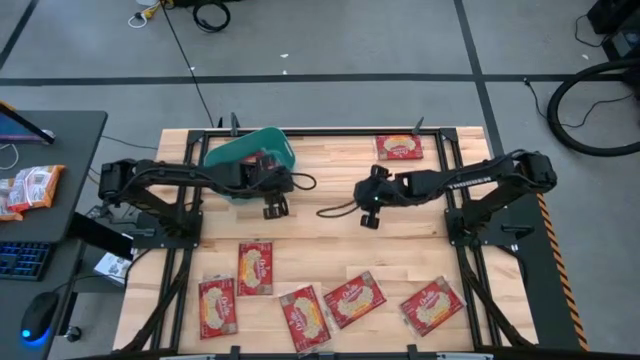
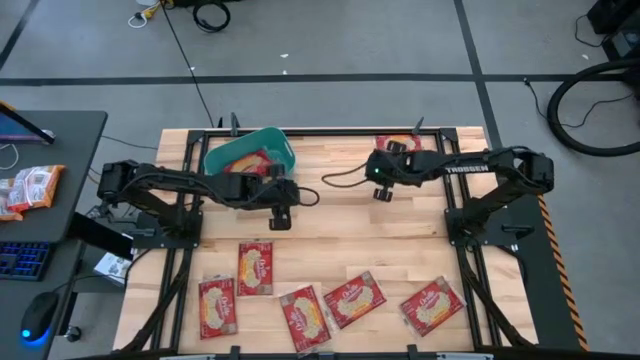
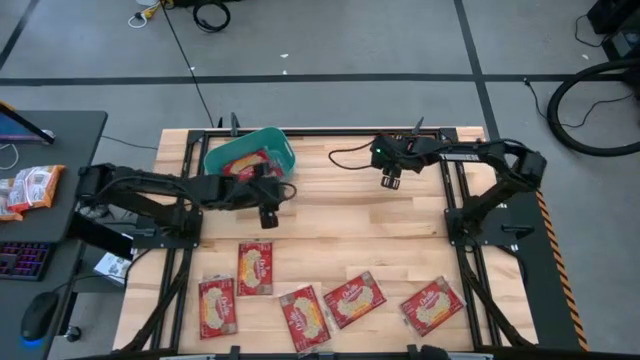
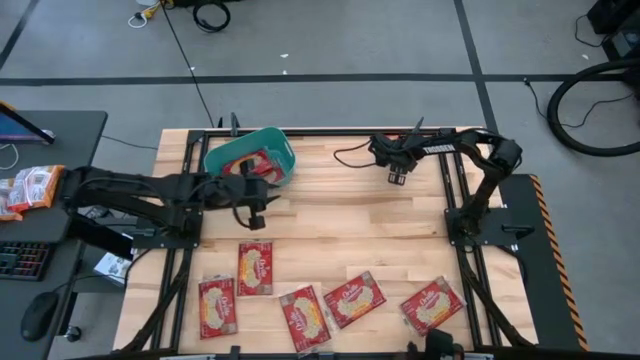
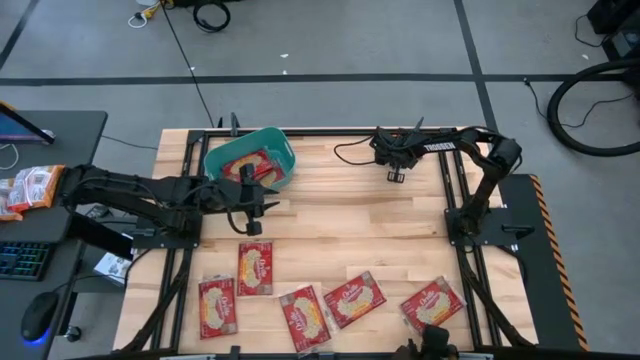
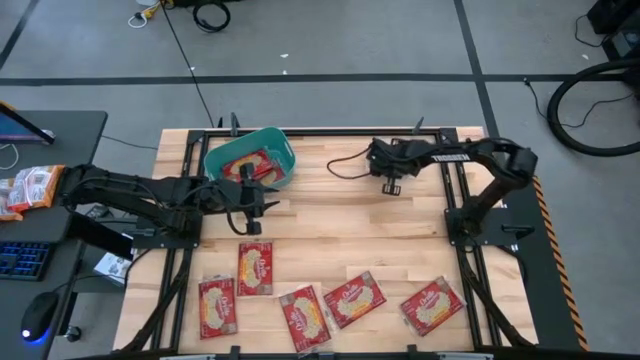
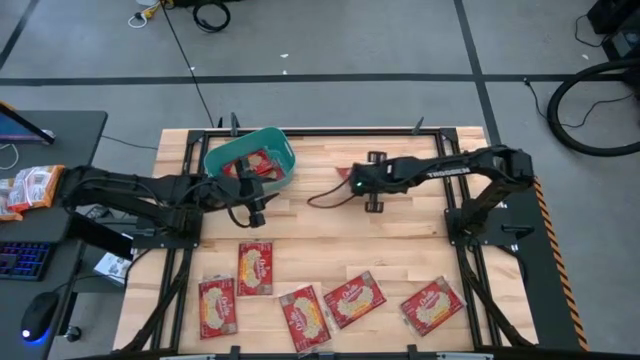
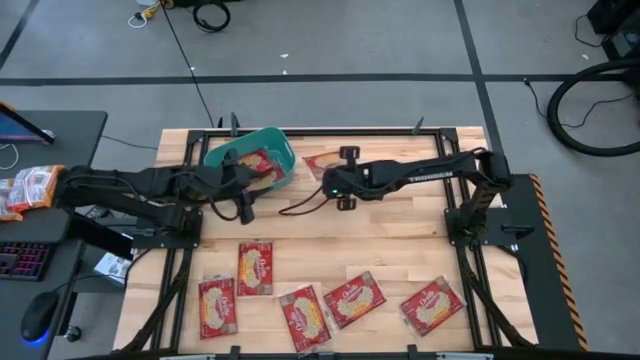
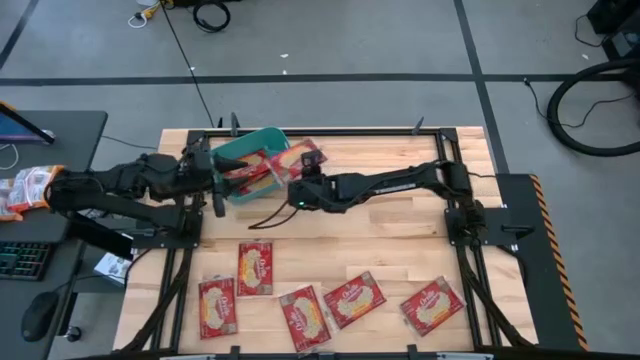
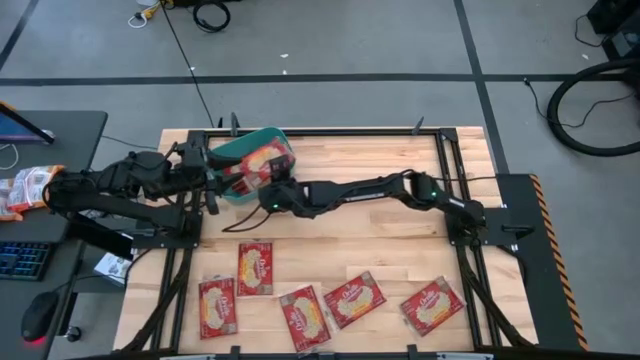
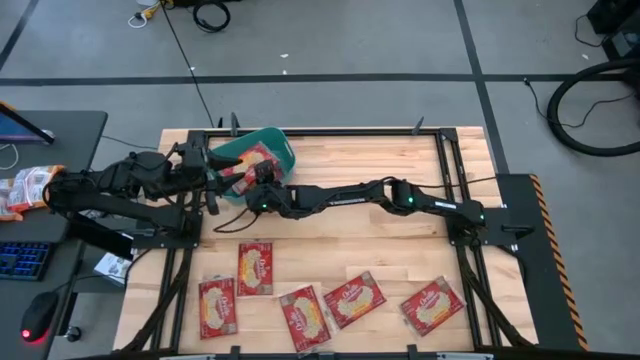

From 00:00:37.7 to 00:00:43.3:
Task: Sort popcorn bags into baskets
Put the popcorn bag into the bin

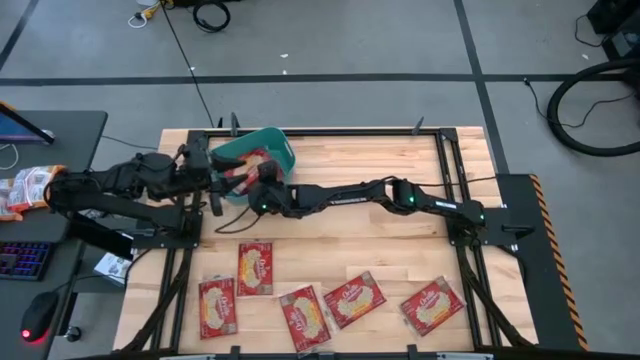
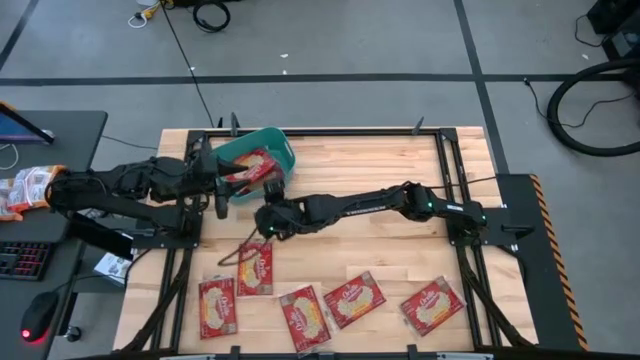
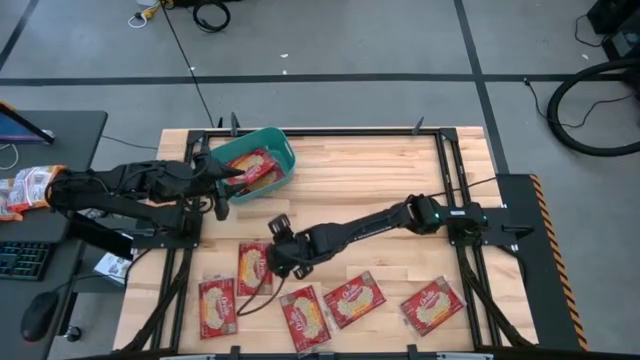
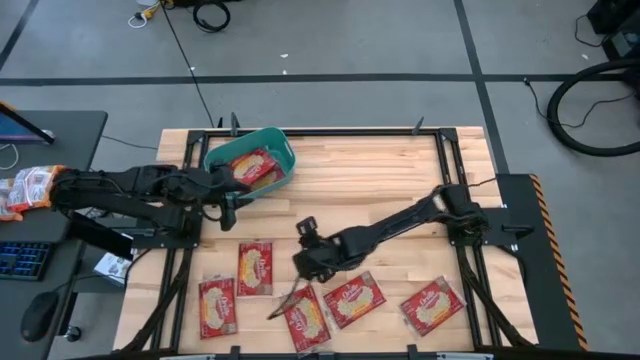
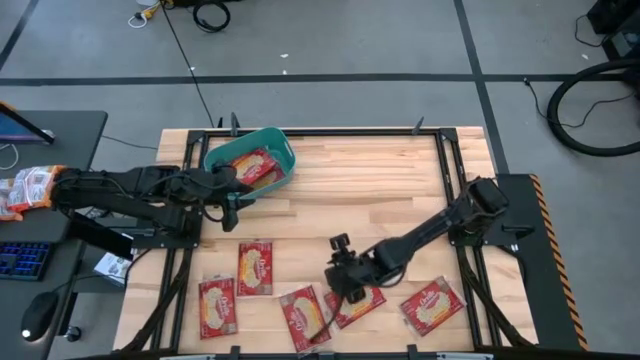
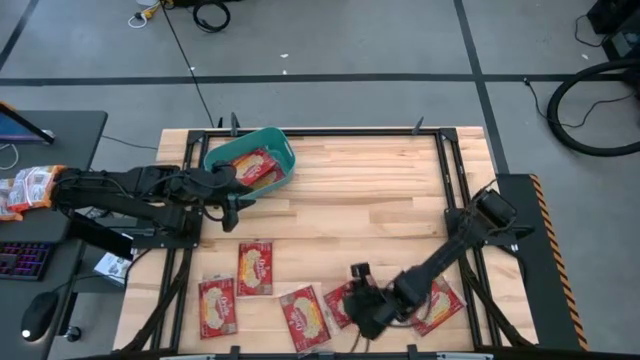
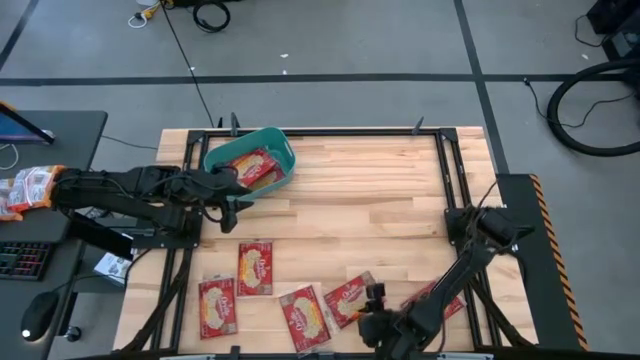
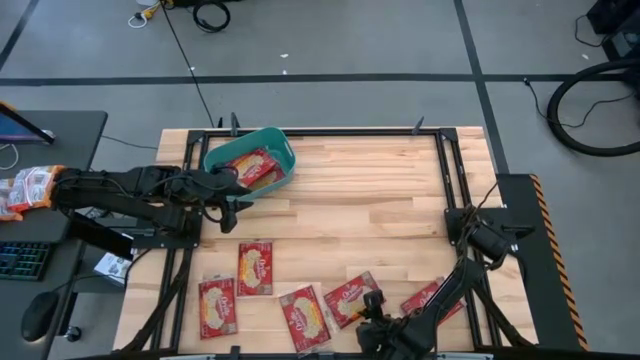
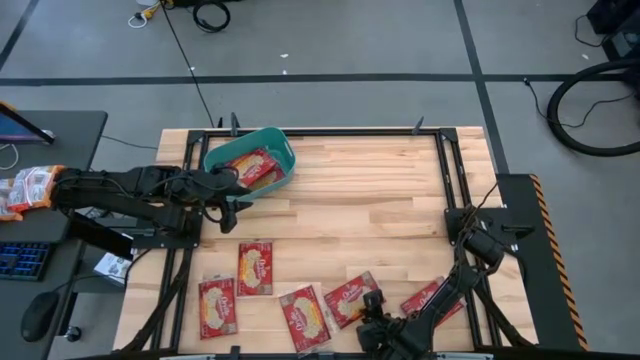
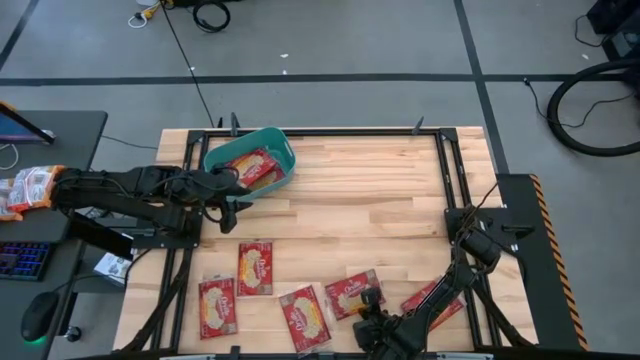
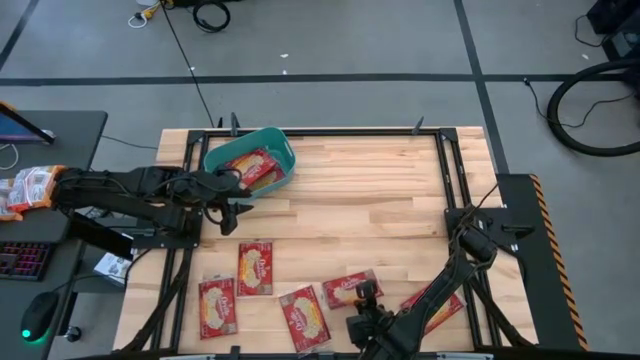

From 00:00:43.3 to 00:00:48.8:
Put the popcorn bag into the bin

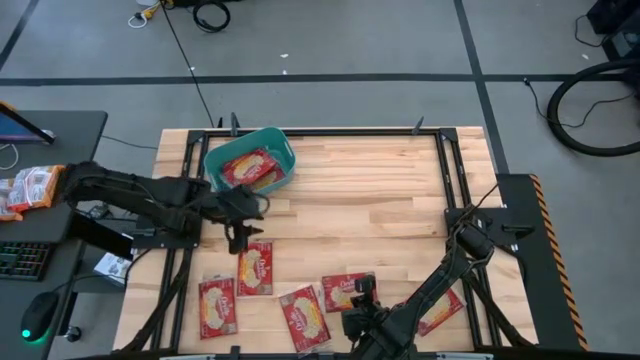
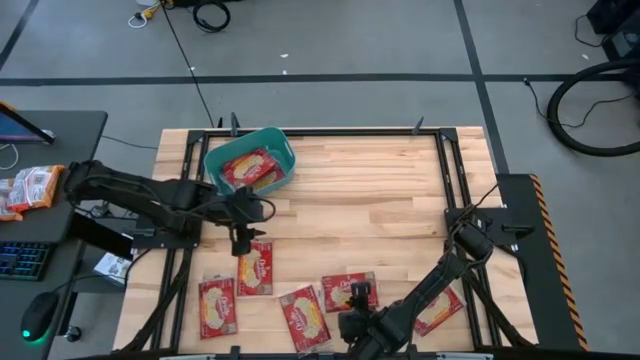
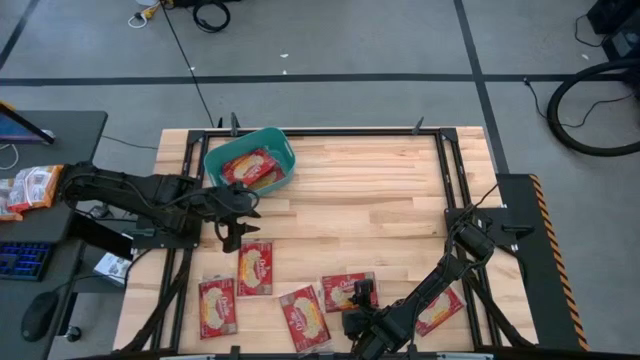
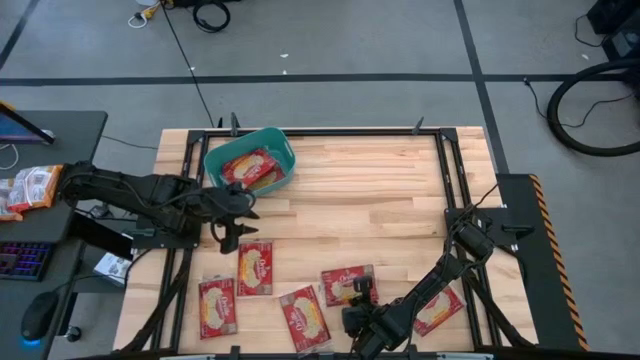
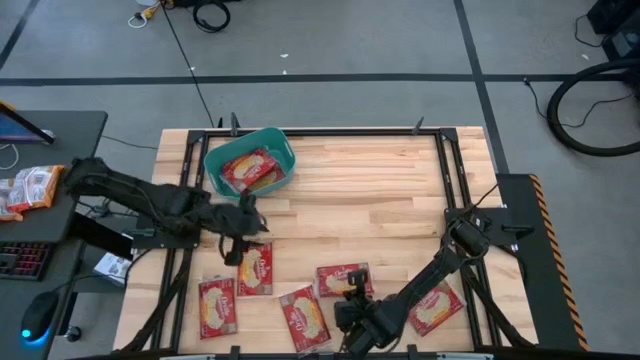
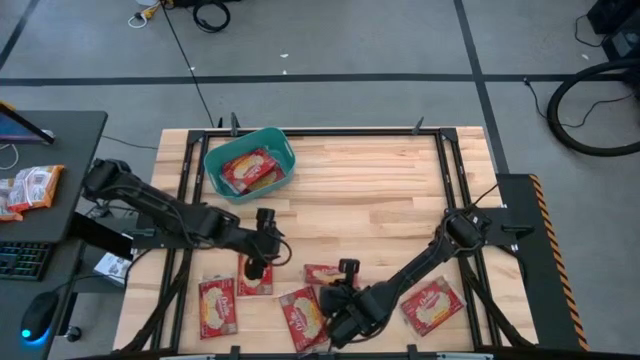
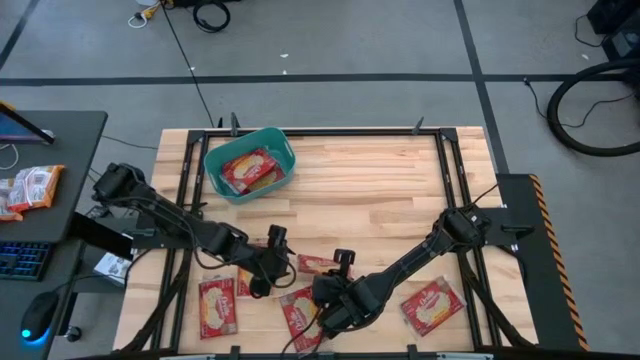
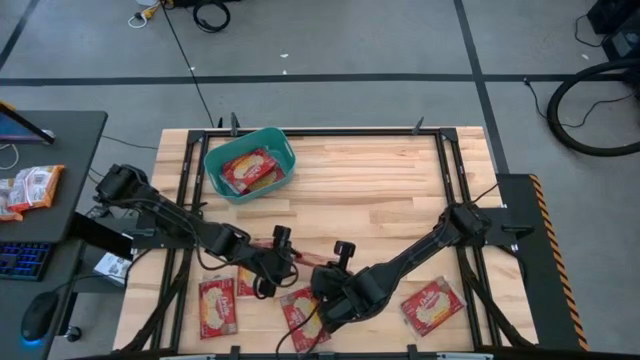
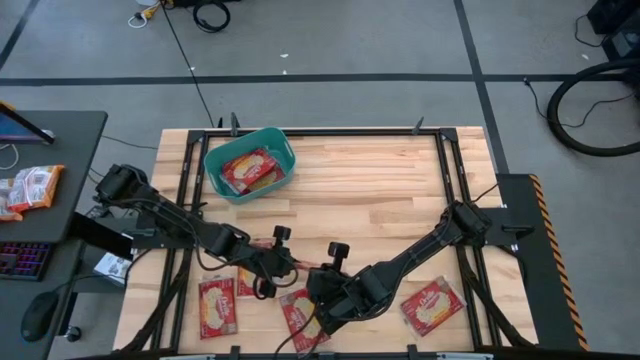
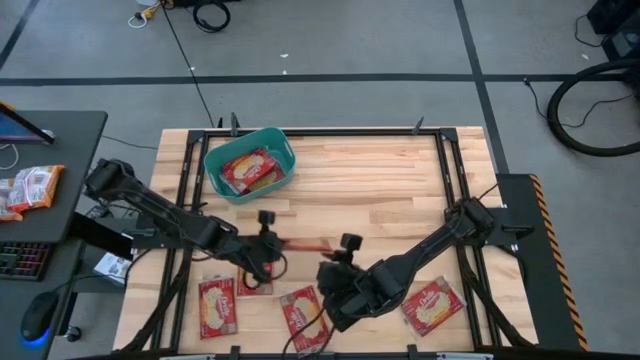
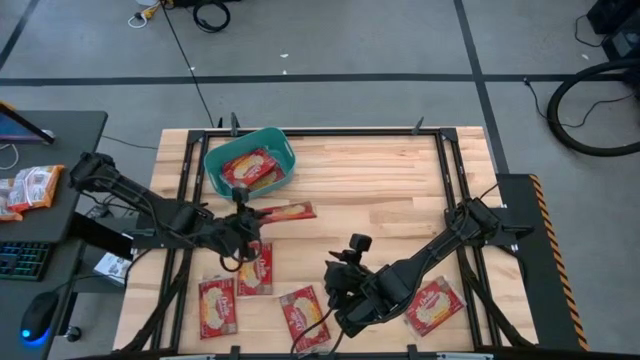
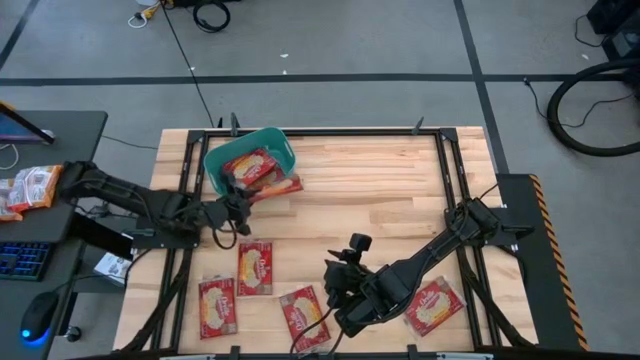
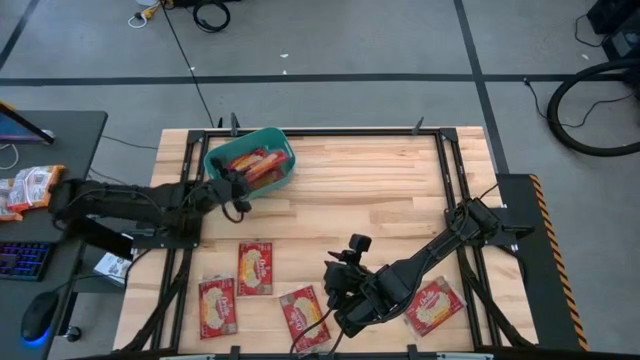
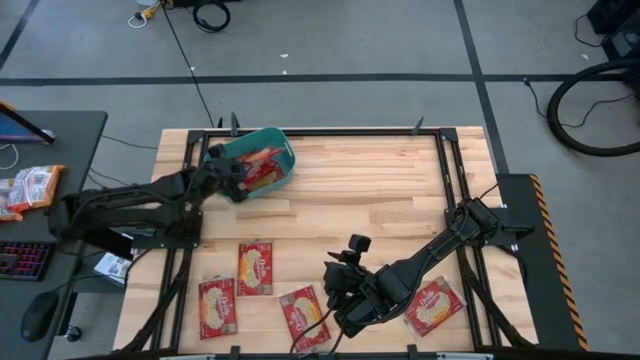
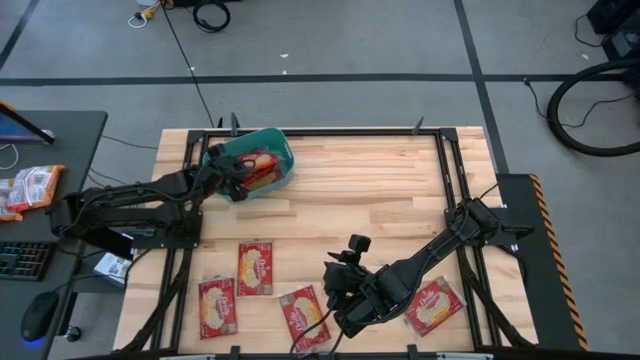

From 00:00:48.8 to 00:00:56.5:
Put the popcorn bag into the bin

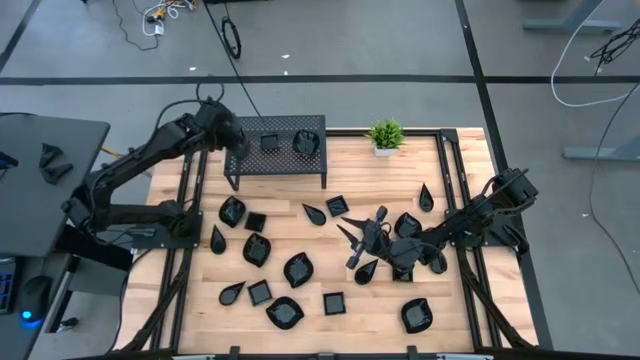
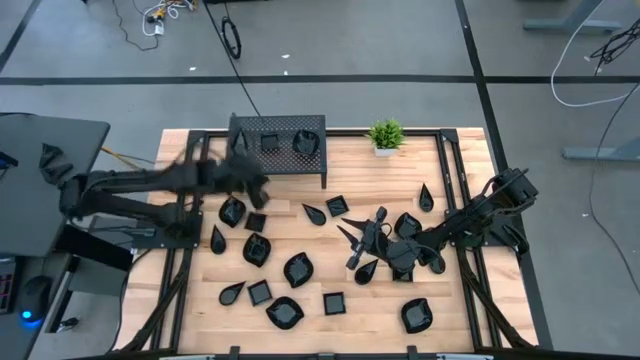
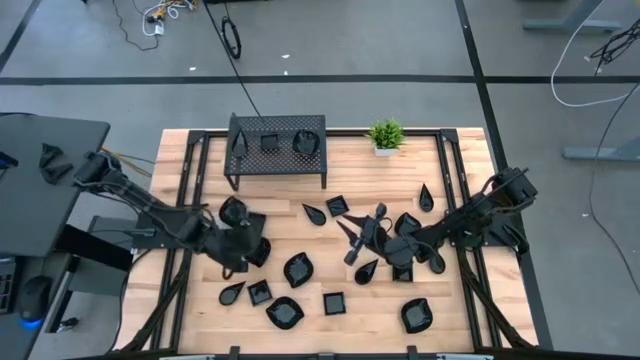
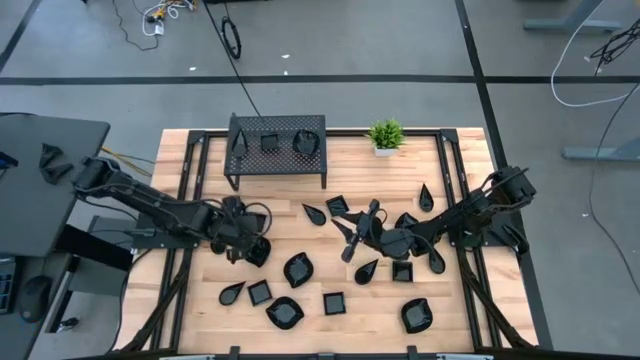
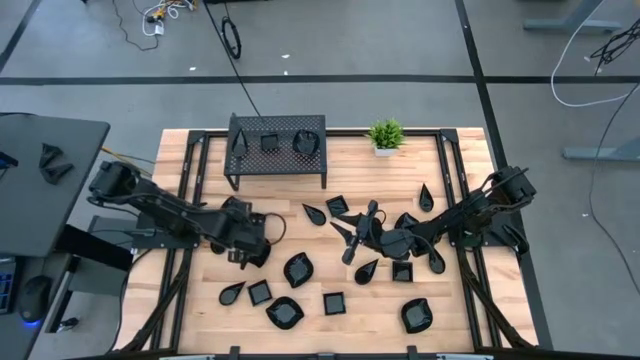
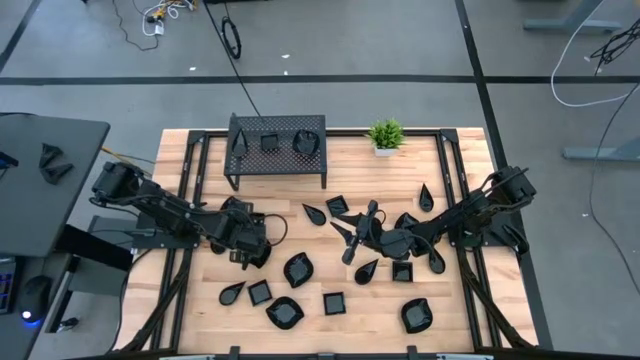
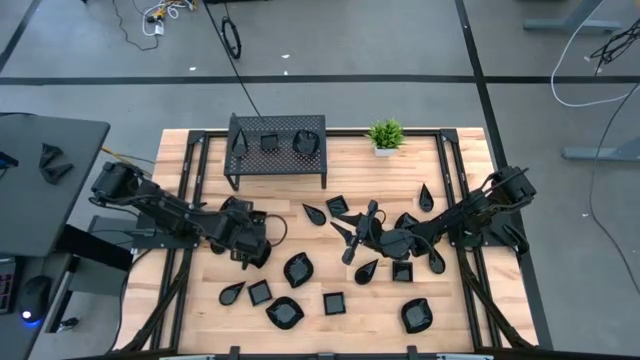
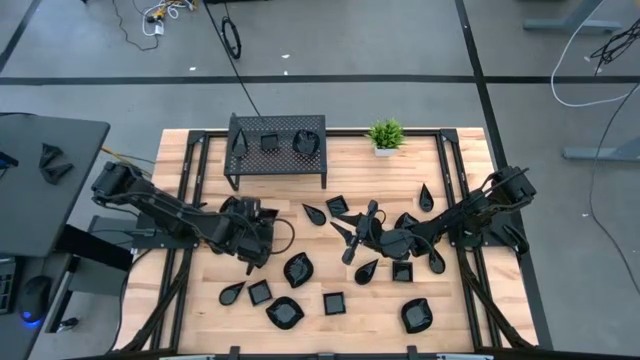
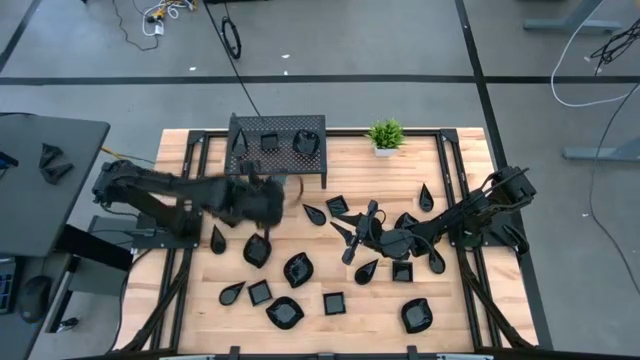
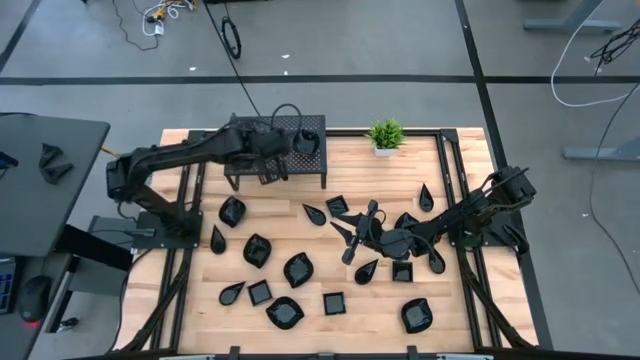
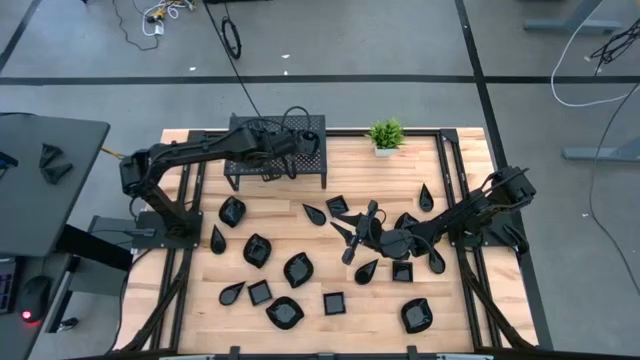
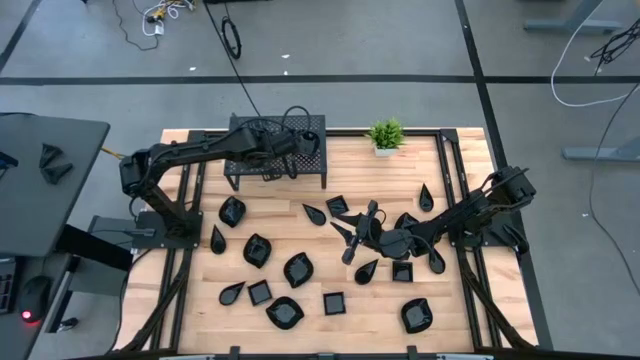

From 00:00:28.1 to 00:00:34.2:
Task: Pick & Place Mini shaped plates
Stack the black square plate on top of the black square plate on the shelf
